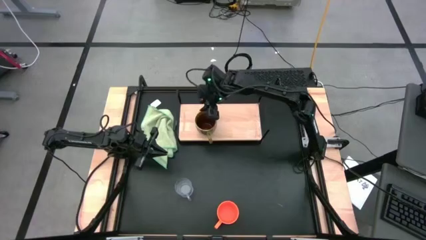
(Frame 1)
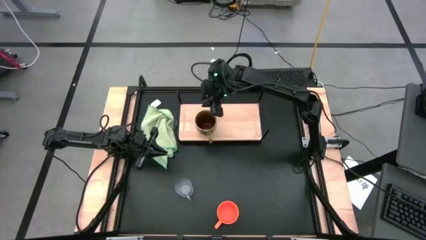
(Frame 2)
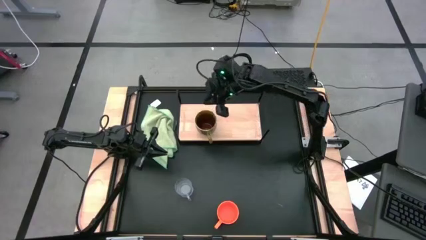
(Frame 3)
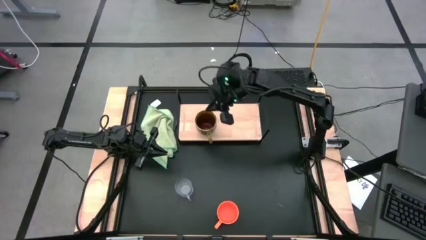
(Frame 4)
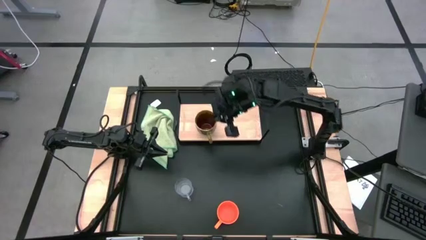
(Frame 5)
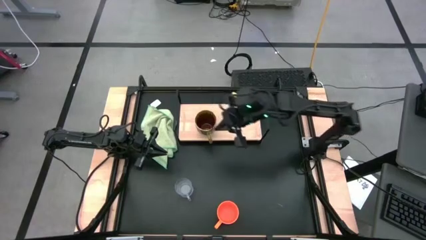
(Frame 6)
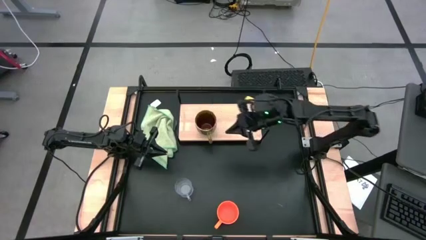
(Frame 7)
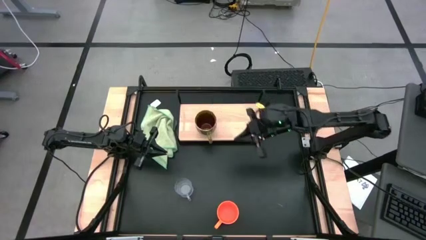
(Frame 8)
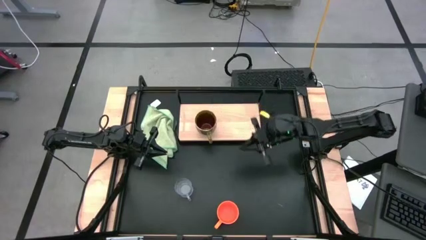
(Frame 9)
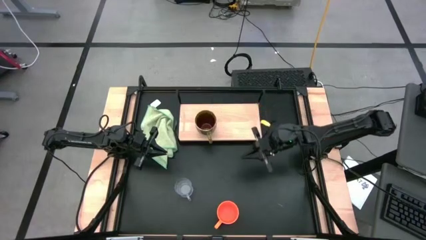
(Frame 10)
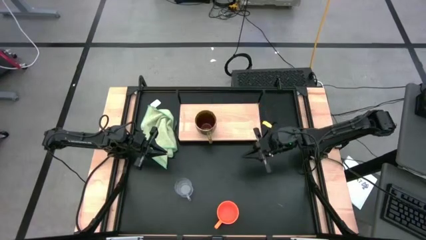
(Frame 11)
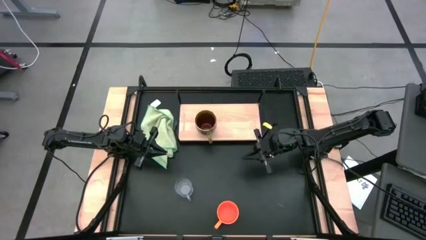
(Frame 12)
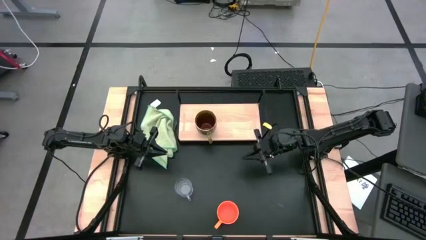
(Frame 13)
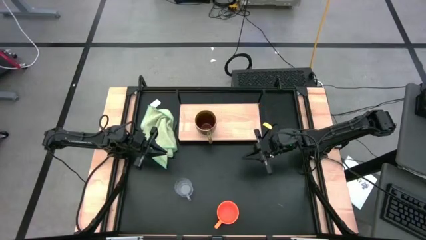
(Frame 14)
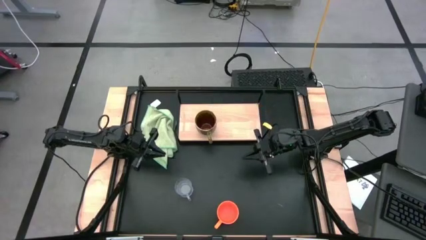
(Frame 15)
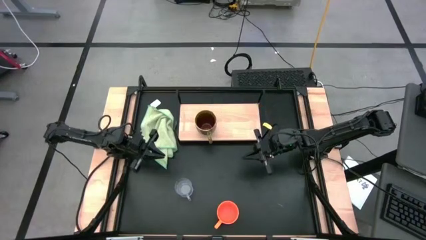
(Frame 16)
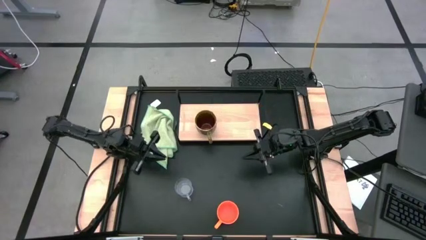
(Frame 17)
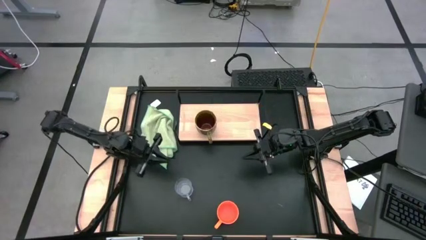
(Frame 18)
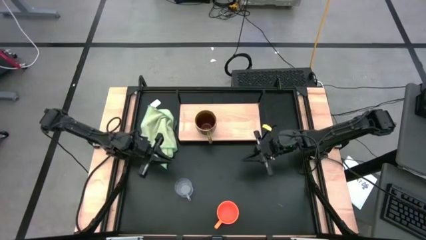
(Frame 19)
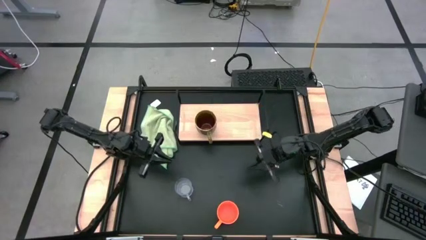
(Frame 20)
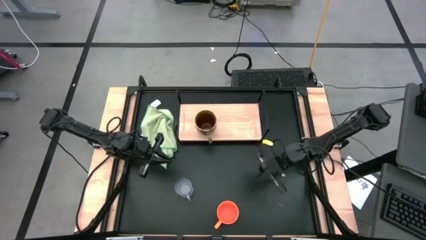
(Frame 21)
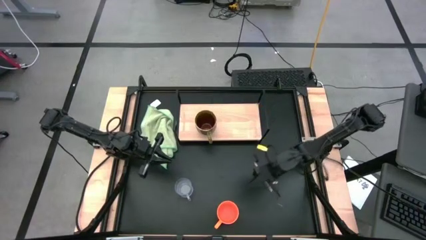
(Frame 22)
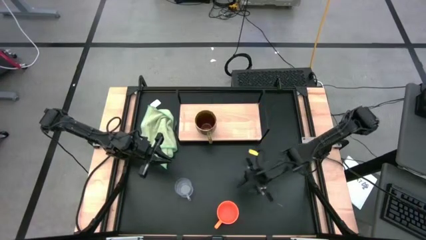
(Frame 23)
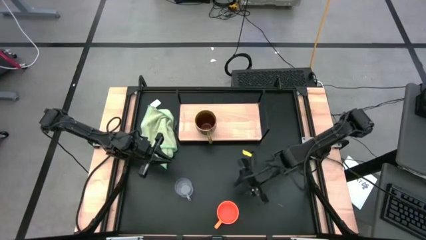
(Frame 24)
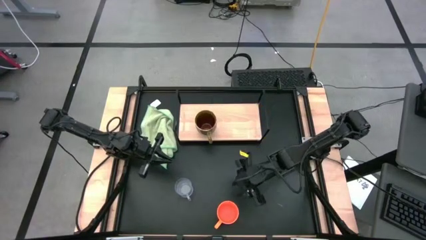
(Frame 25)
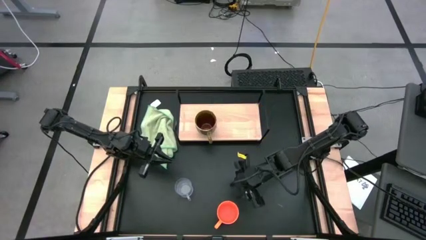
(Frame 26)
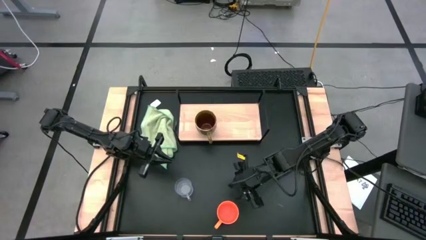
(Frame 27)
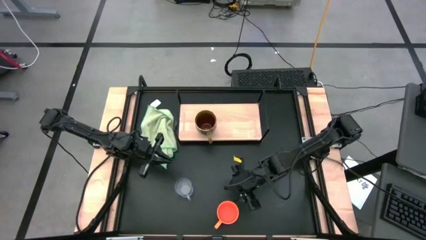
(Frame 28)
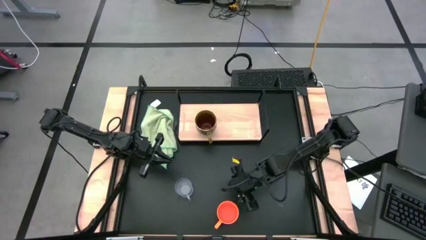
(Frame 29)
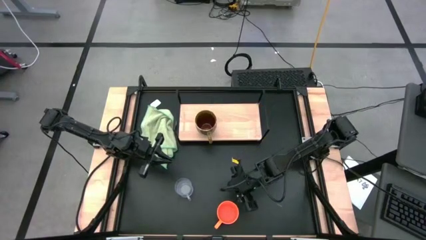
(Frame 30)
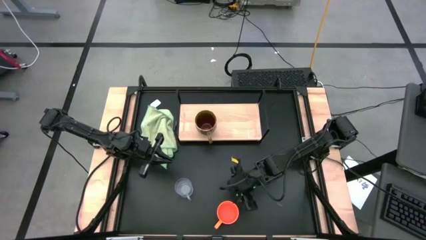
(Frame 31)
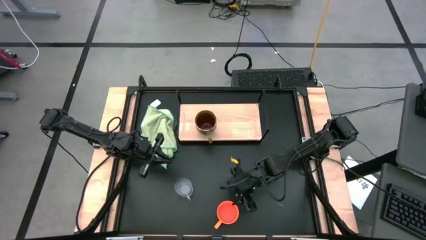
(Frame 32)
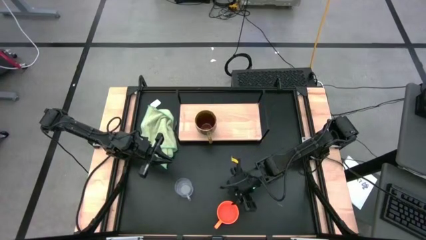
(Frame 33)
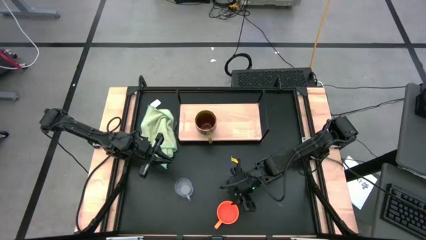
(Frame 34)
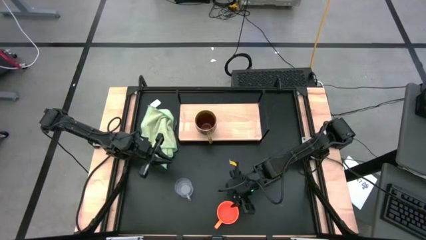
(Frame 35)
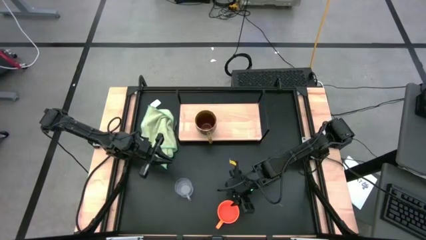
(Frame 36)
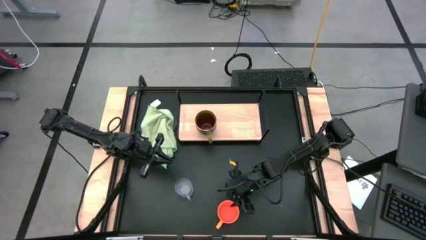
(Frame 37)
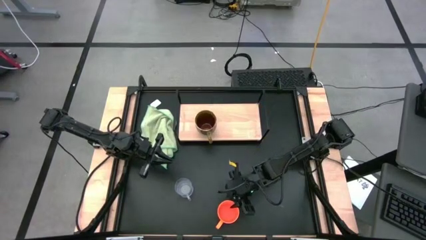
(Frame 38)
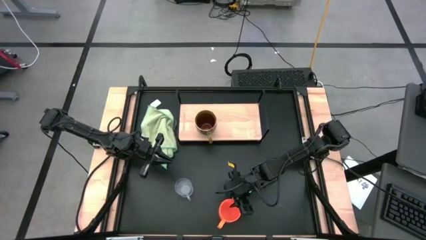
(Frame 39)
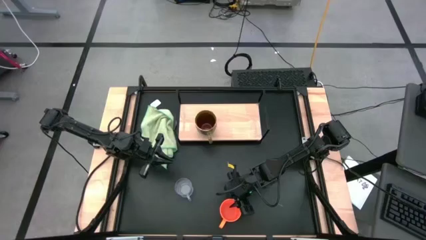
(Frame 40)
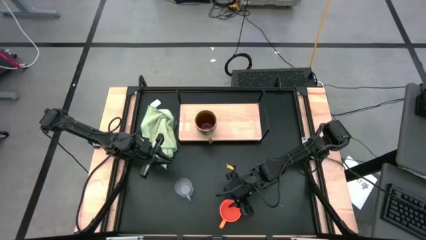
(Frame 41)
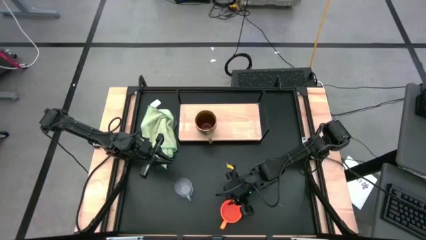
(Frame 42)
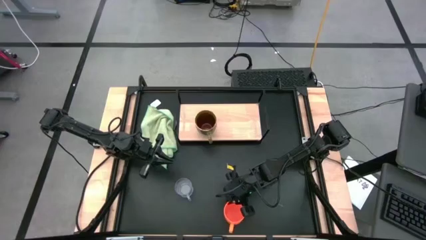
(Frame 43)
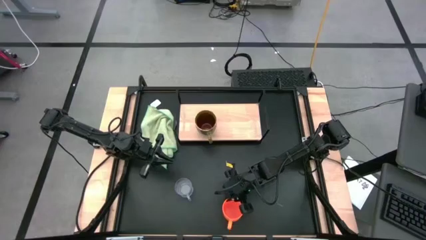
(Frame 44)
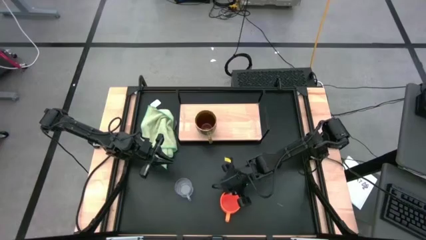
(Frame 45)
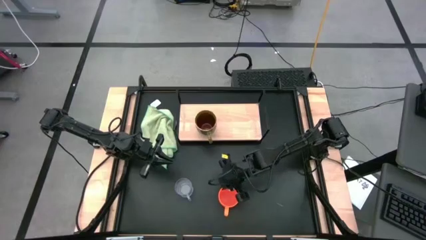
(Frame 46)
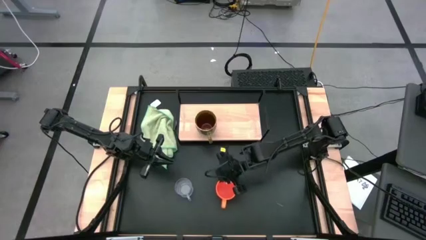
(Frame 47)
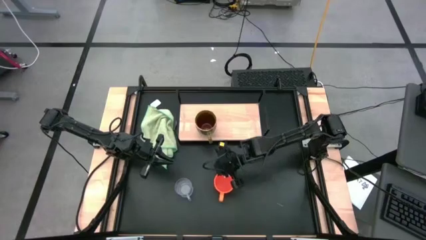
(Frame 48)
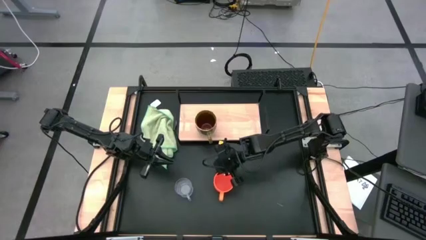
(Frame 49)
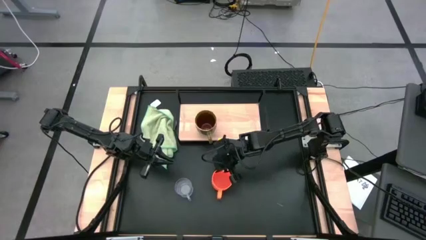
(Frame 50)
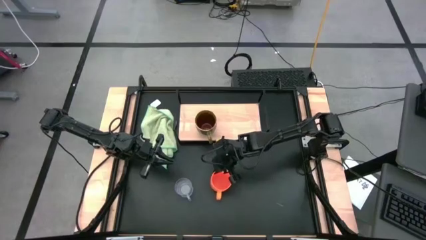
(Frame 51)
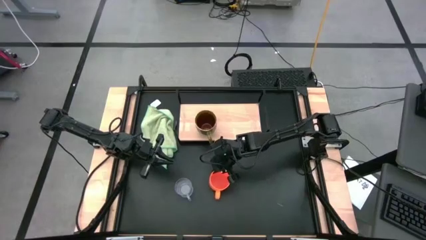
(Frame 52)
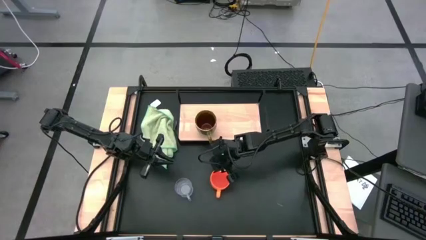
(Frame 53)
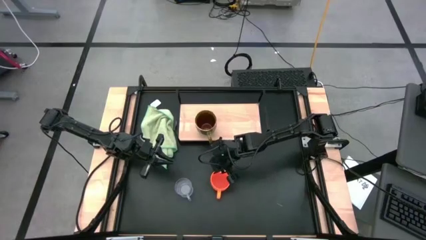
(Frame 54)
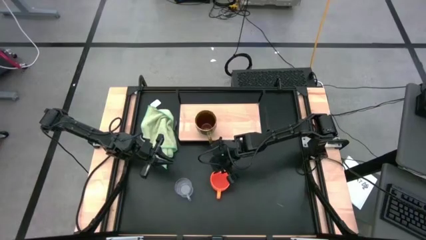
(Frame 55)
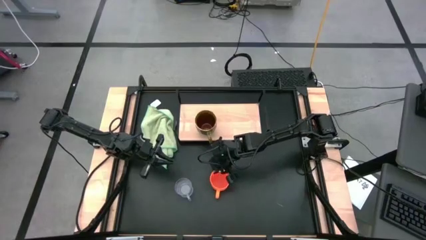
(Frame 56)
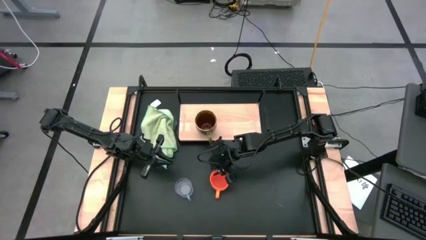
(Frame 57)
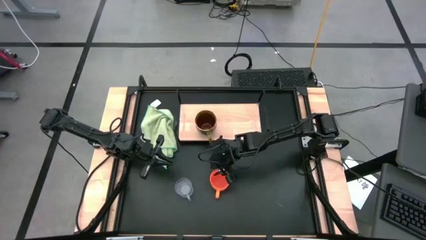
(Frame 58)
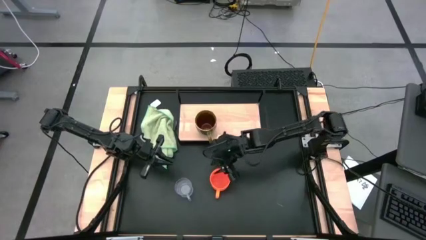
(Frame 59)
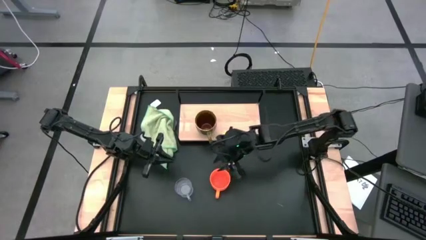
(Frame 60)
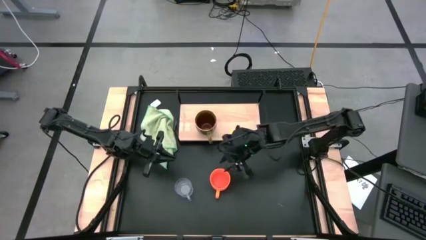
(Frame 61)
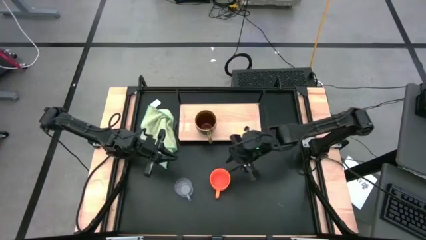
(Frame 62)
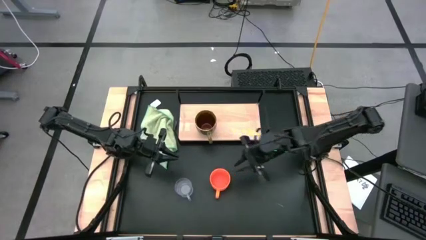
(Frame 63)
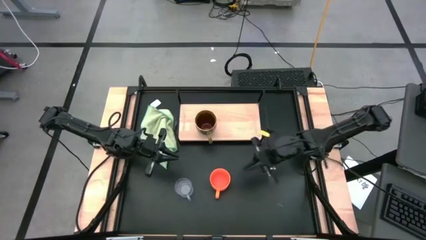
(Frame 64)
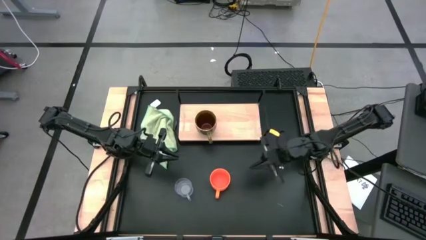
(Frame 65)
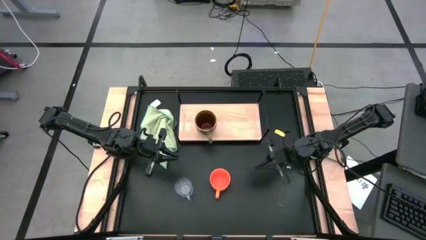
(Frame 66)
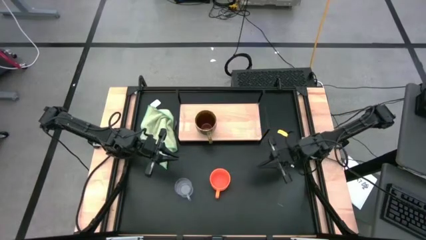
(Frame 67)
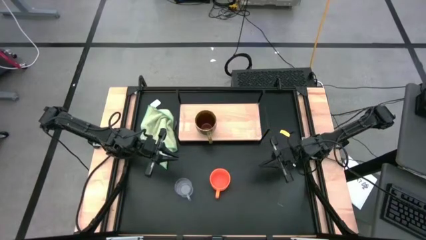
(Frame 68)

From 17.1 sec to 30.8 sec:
Task: Stack small to large cups/mugs on shelf
Put the orange mug to the right of the light green mug on the shelf
